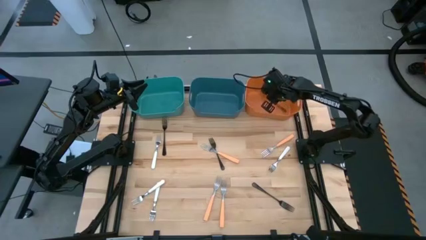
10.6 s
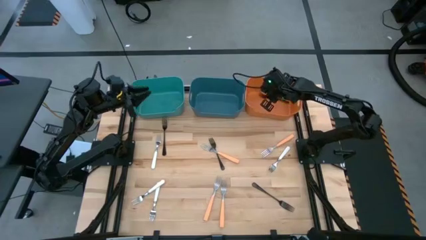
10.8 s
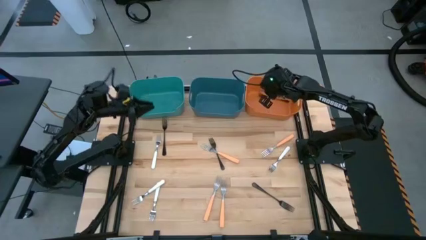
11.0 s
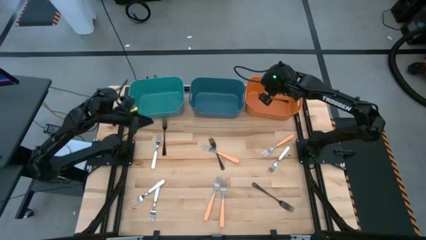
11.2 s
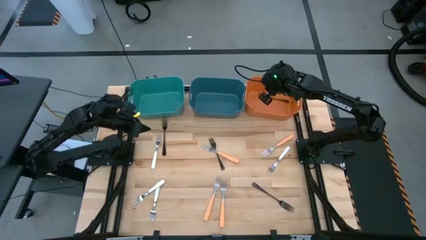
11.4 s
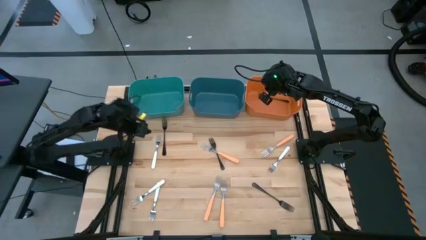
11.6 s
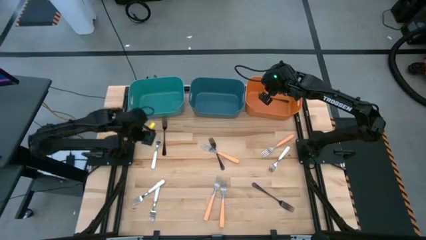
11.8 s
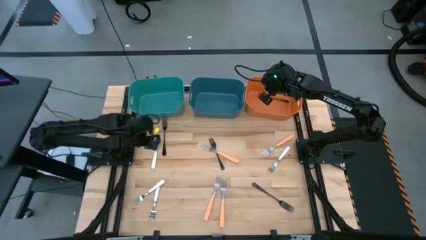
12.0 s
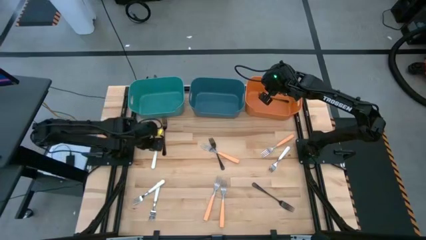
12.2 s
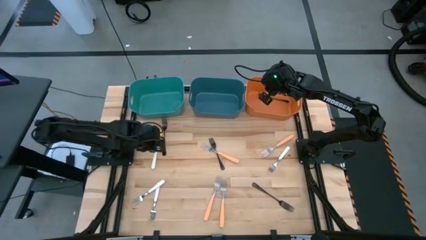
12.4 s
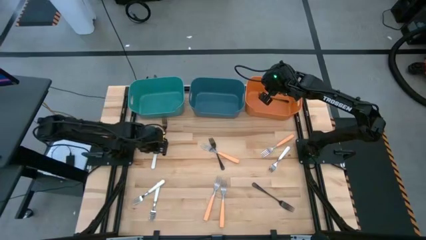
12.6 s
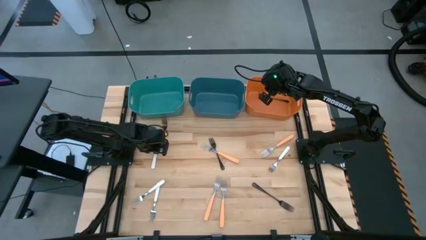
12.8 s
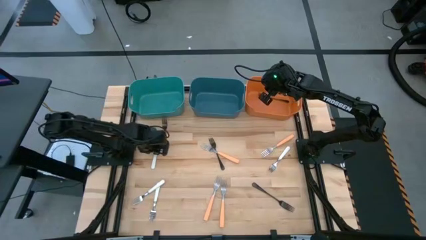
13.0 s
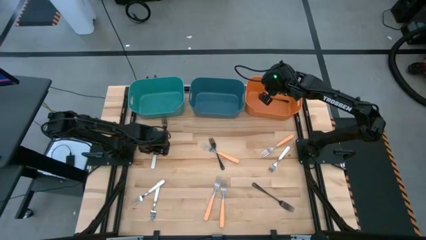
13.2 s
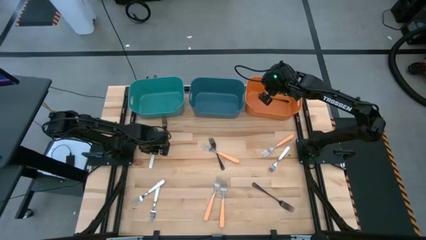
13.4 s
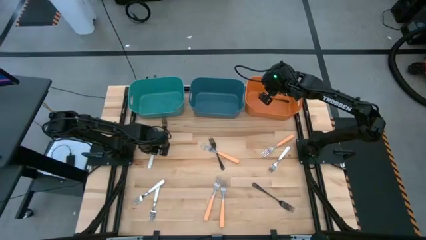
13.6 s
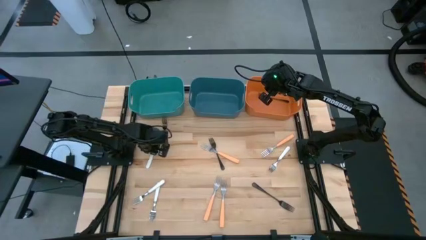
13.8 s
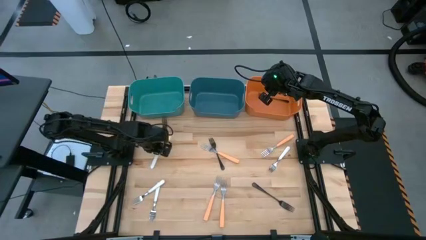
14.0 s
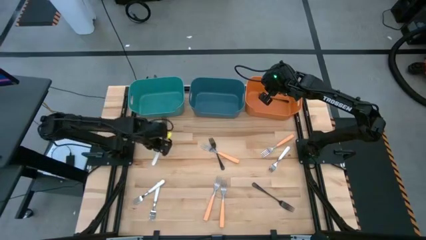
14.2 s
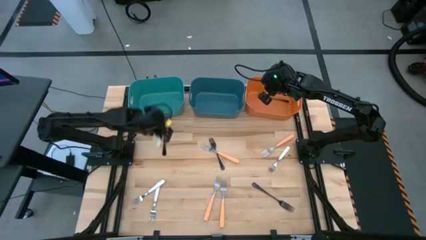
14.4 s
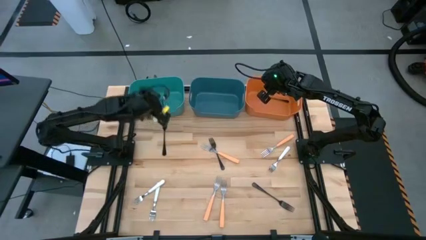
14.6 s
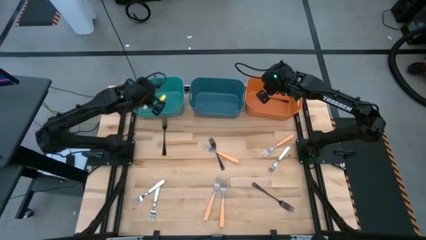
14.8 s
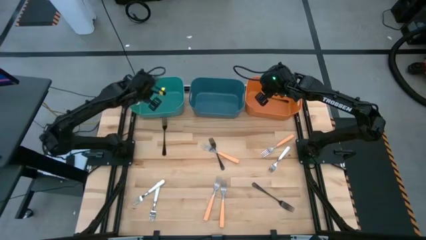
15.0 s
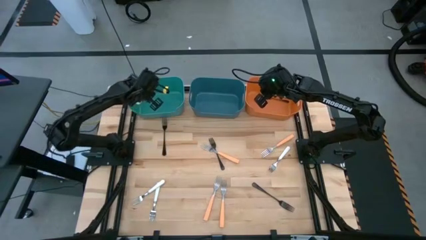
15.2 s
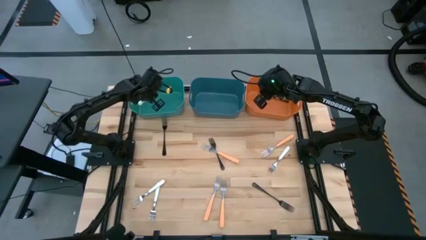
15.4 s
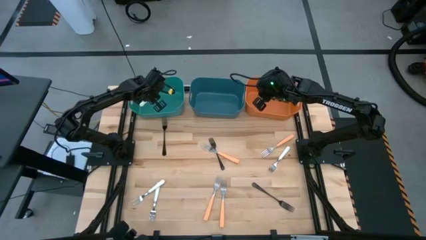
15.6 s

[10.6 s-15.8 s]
Task: Sort silverware by color (type)
Put the top left white fork into the light green bin

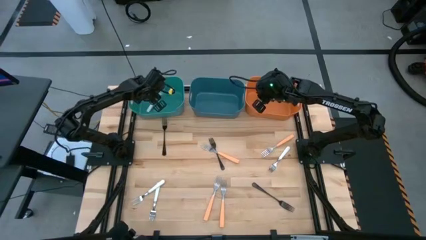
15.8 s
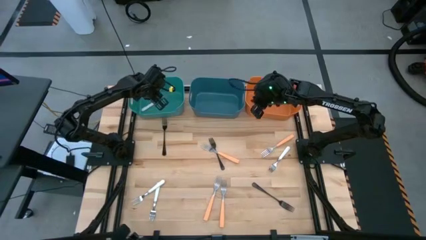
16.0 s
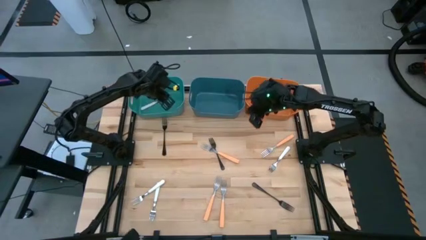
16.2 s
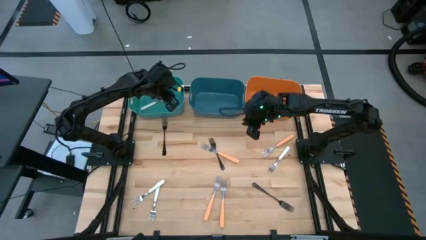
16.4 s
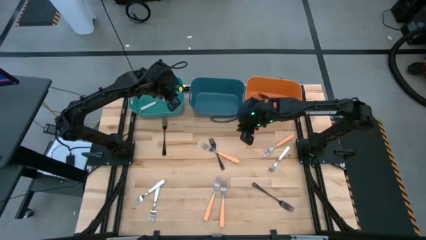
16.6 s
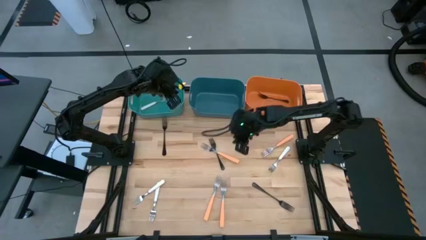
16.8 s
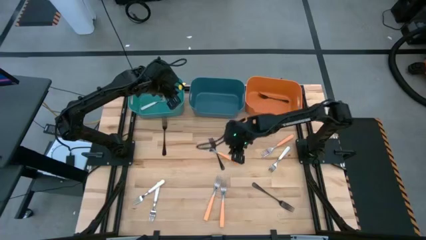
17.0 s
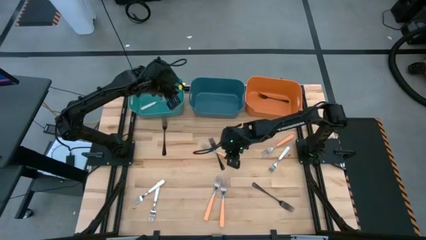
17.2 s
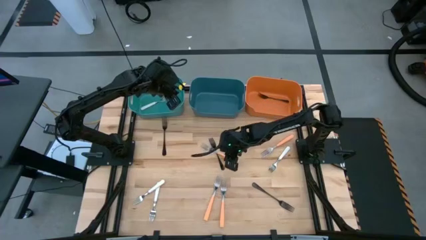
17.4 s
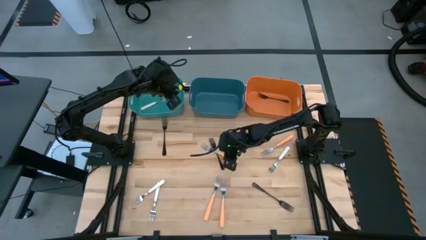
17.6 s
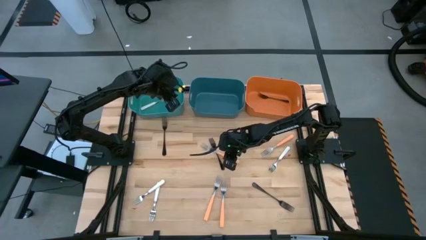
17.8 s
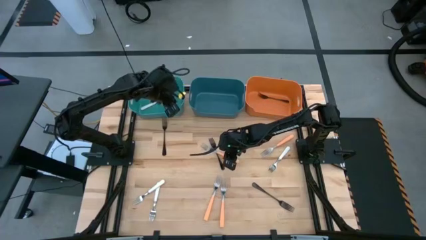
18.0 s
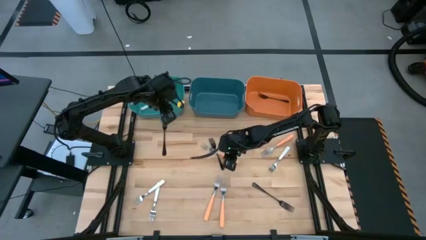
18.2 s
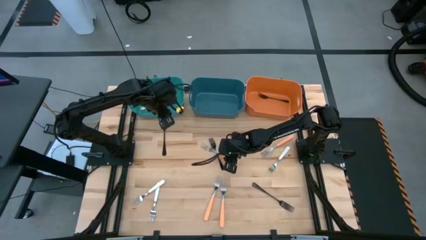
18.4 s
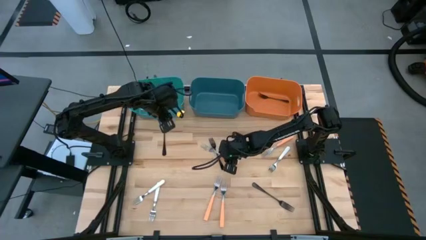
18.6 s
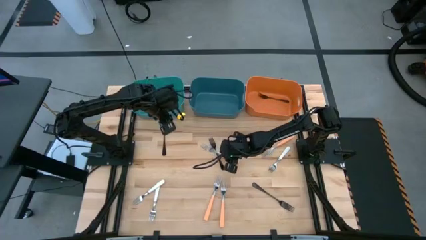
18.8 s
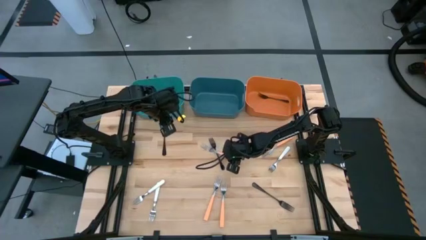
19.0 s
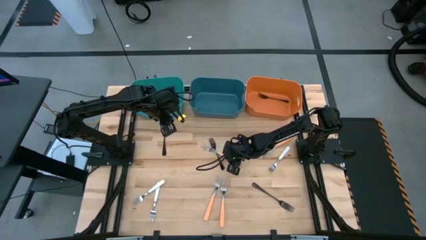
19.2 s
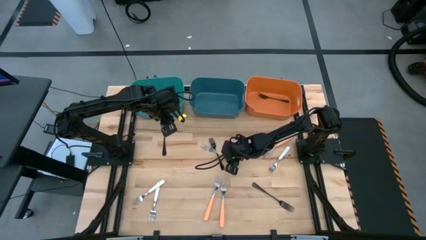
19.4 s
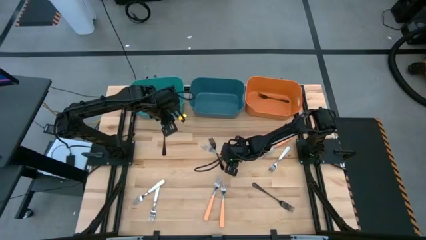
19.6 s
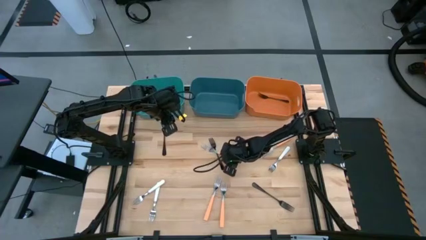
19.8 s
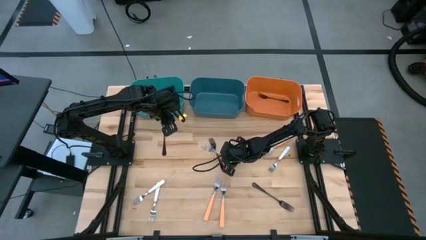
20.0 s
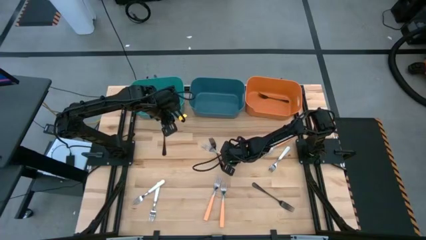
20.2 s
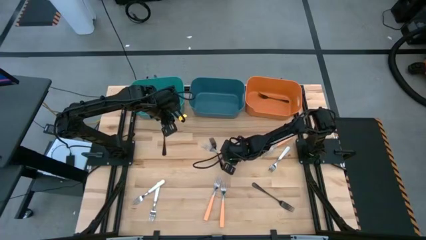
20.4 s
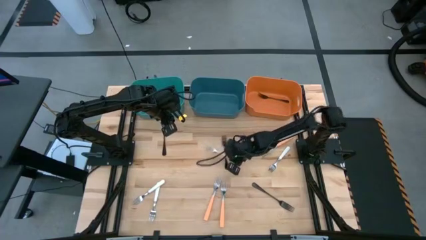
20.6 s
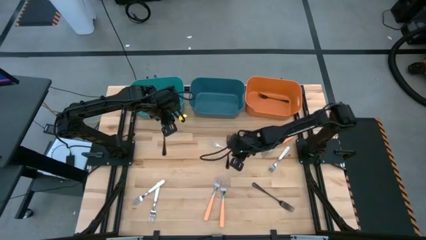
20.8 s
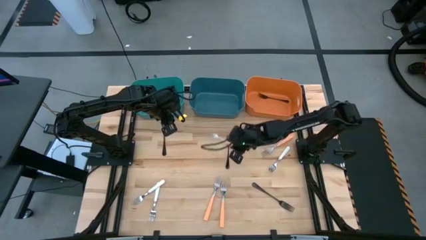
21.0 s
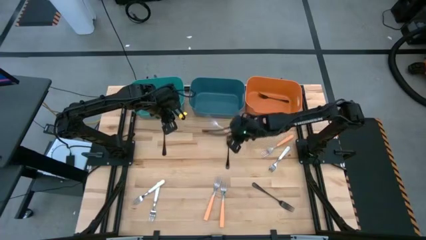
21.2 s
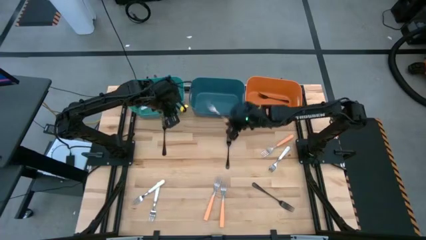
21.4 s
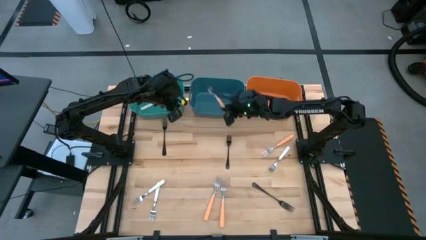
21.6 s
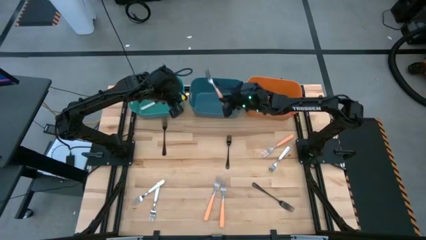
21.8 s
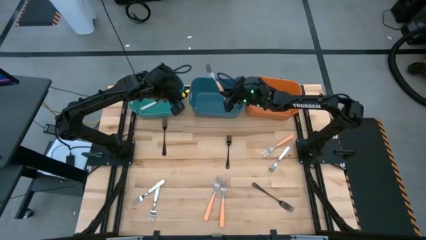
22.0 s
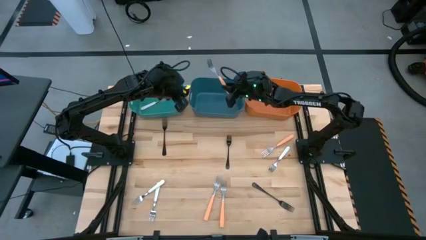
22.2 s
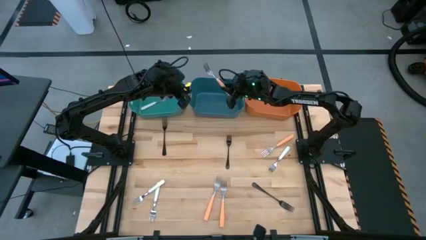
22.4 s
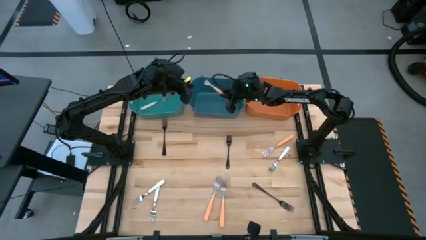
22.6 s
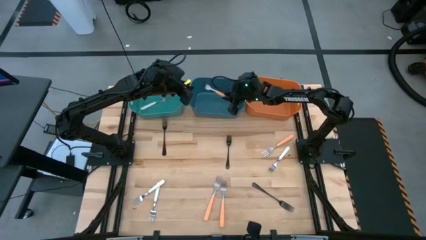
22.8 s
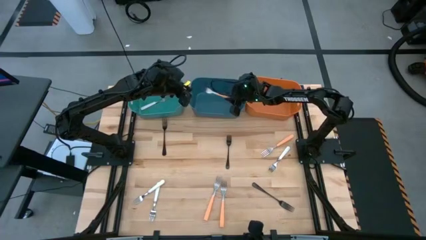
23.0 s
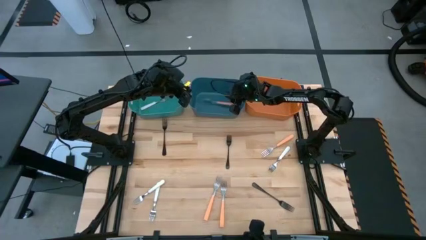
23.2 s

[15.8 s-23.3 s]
Put the top left orange fork into the blue bin

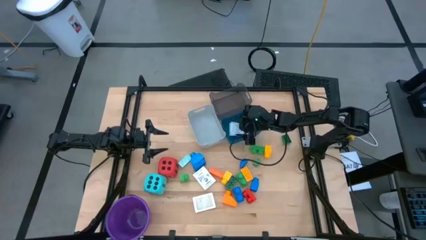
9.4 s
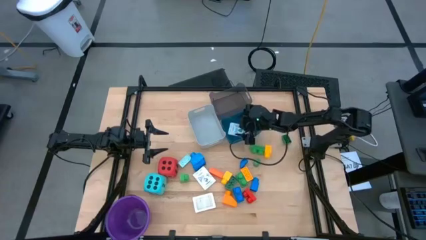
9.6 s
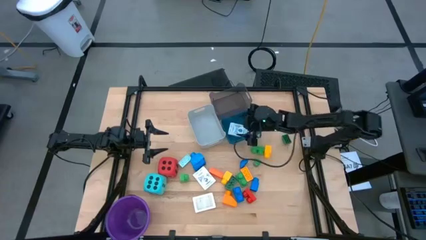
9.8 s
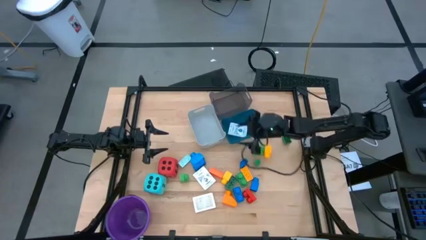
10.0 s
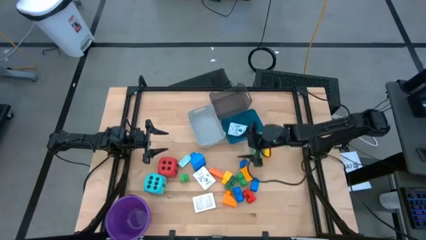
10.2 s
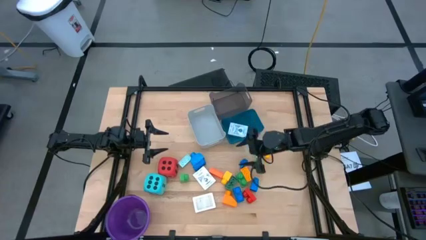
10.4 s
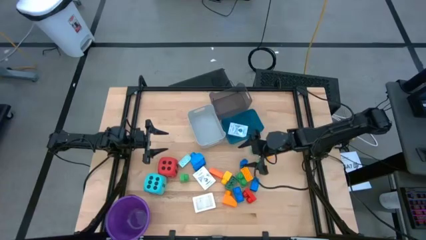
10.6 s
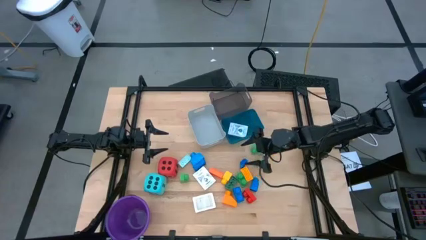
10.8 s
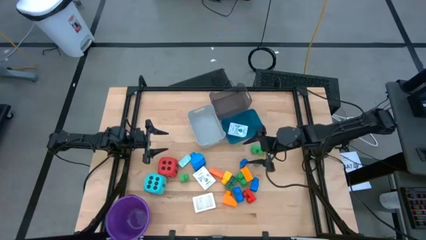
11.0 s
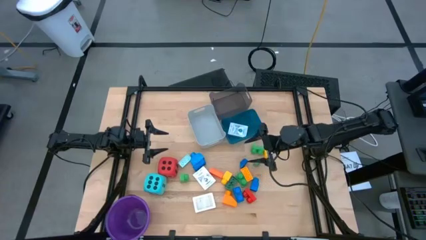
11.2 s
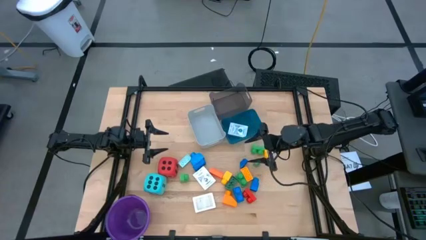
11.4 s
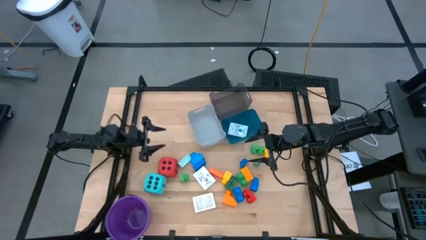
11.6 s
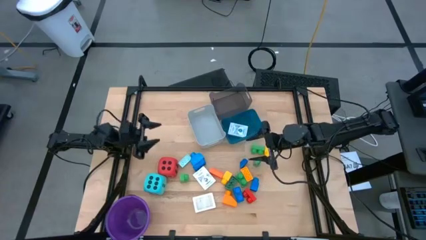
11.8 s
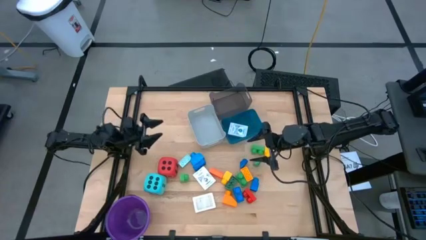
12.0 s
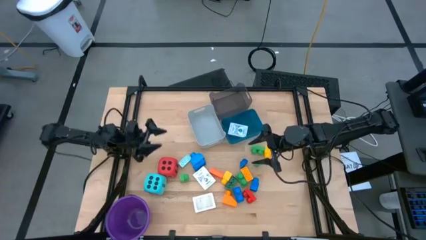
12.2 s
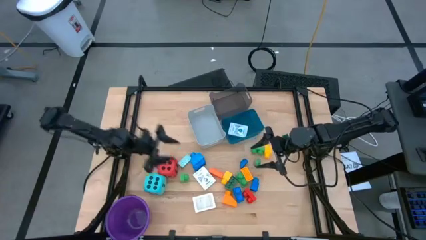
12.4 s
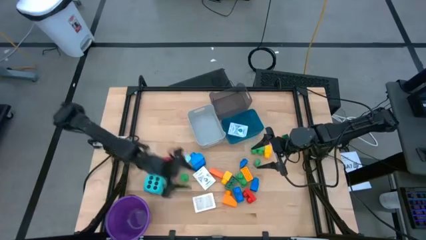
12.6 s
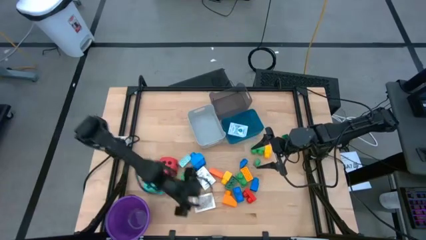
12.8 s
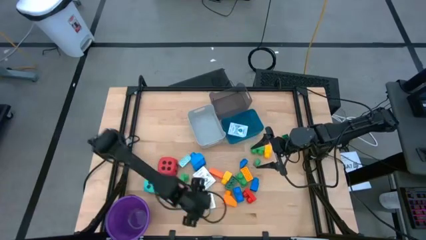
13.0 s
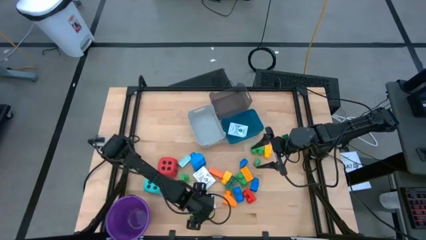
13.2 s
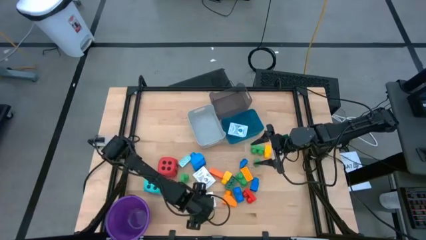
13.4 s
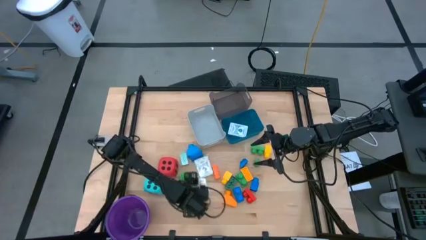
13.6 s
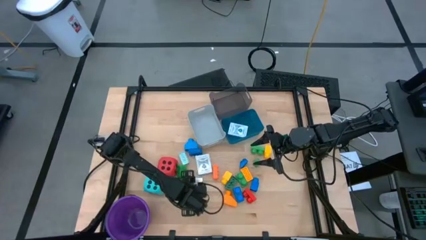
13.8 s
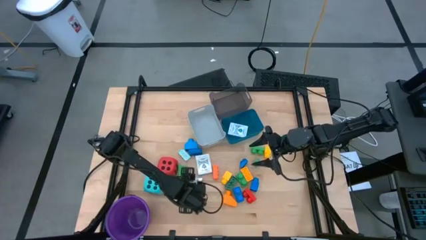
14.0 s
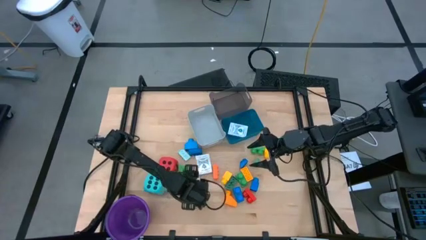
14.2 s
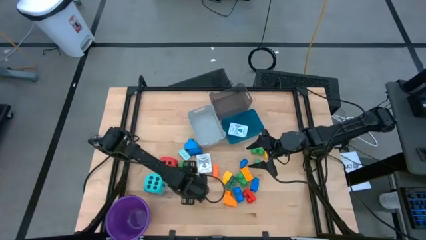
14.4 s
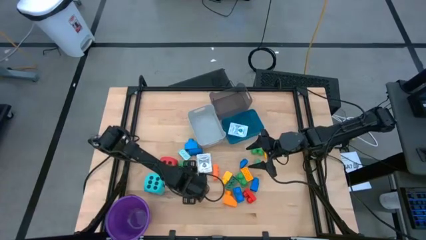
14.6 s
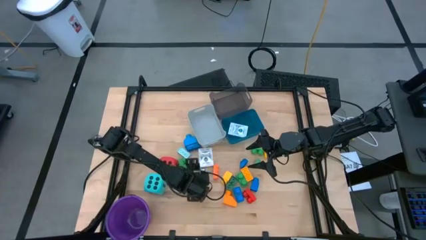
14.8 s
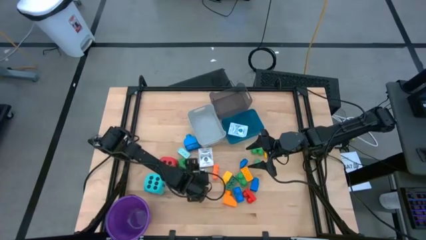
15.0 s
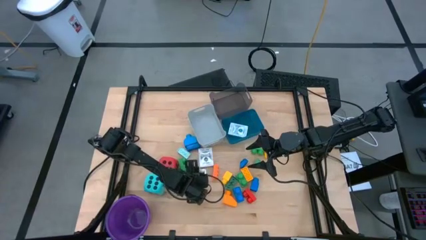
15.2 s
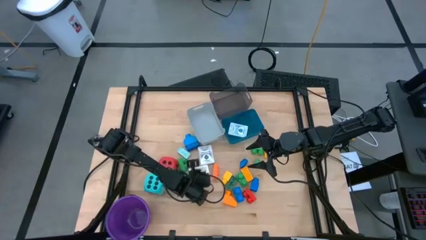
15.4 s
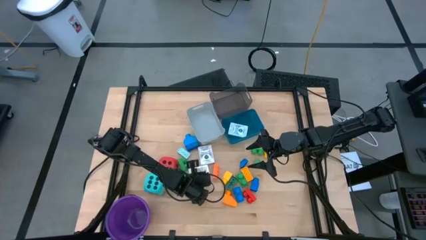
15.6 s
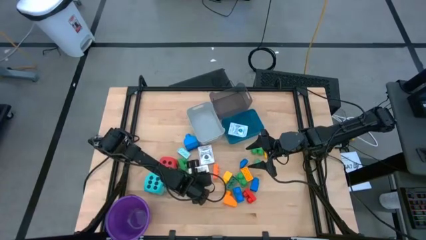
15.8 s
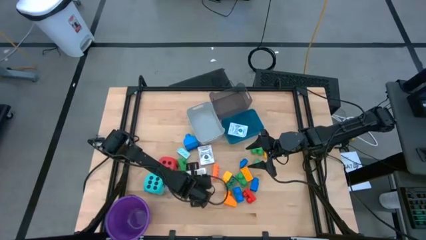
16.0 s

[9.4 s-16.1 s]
Task: Pick & Place Toys
Put the brown deck of cards into the blue bin
